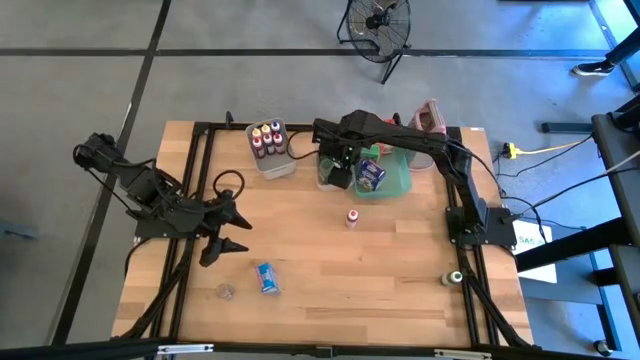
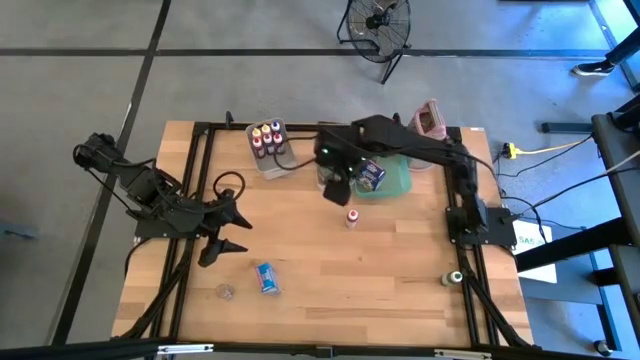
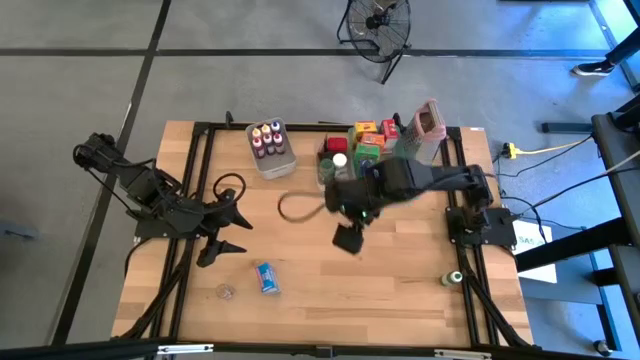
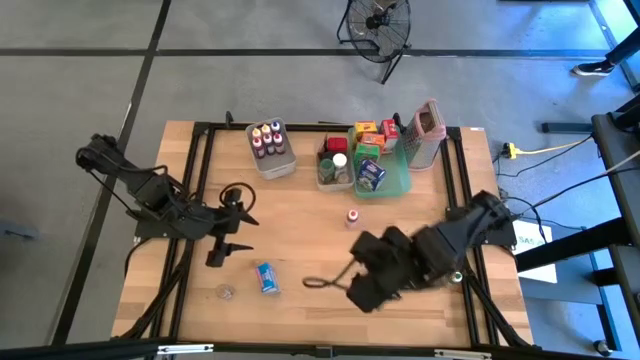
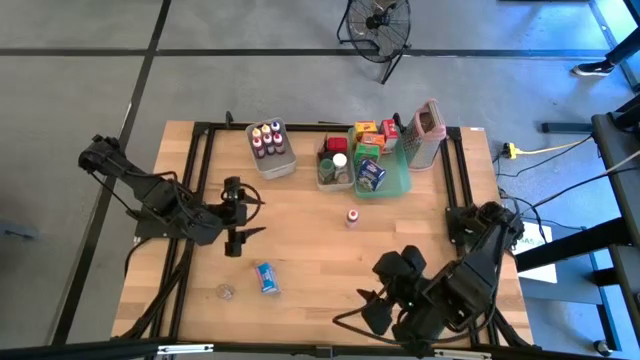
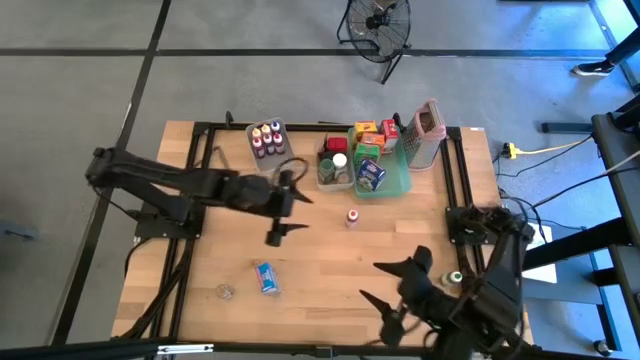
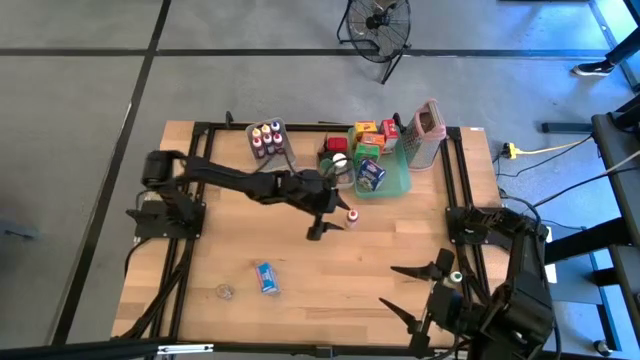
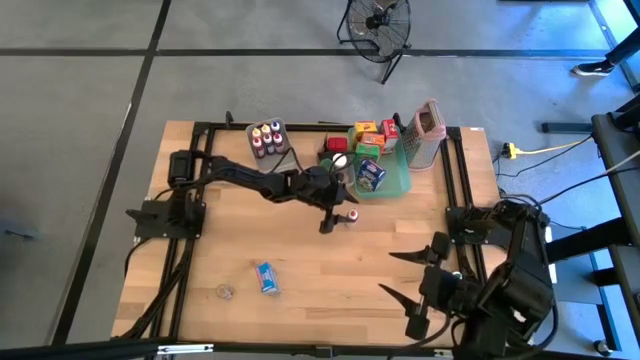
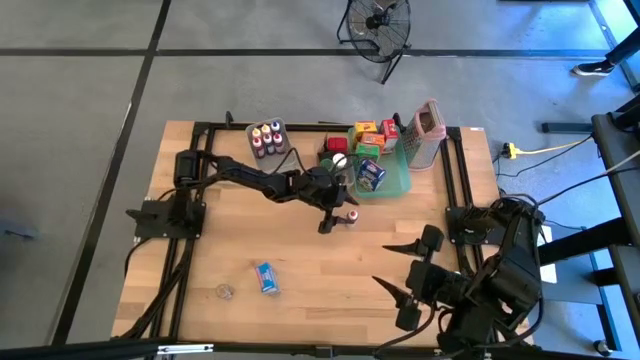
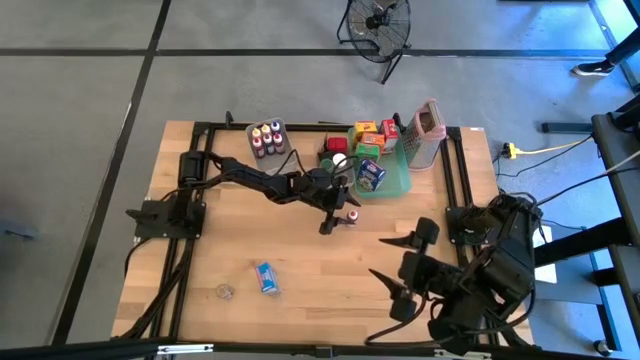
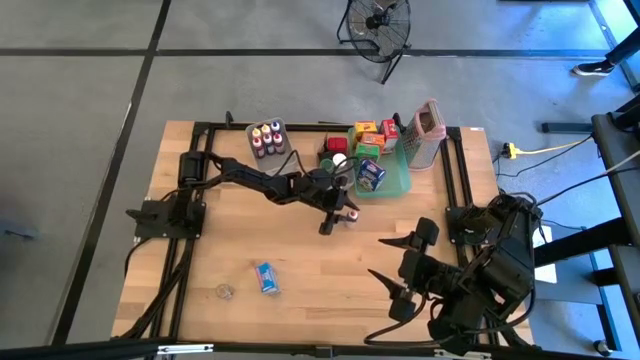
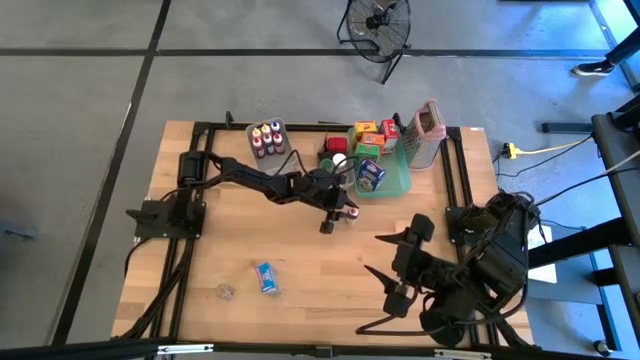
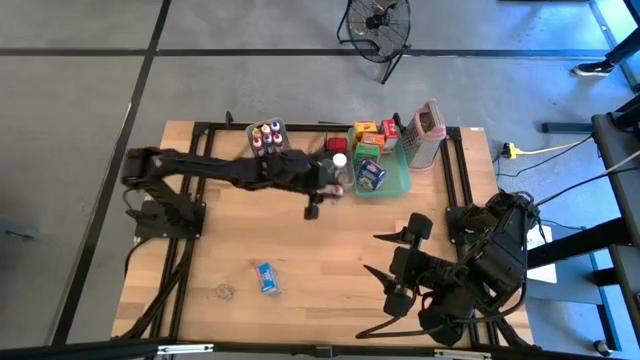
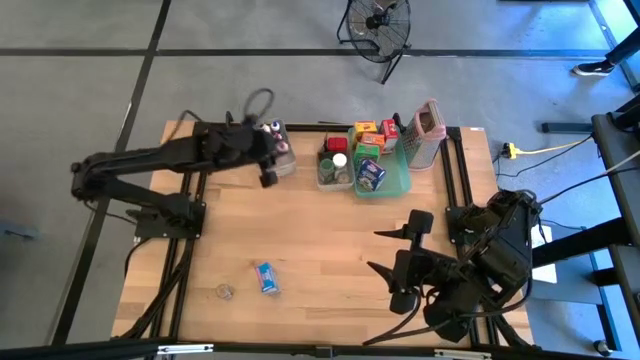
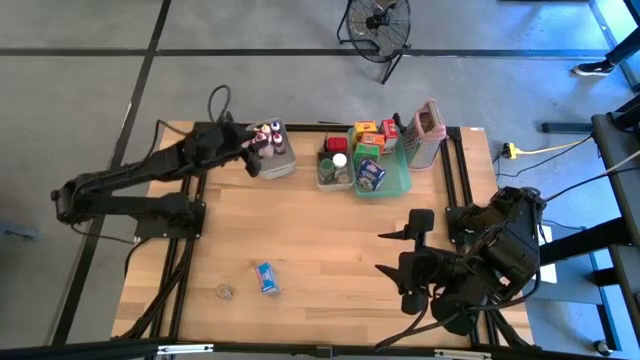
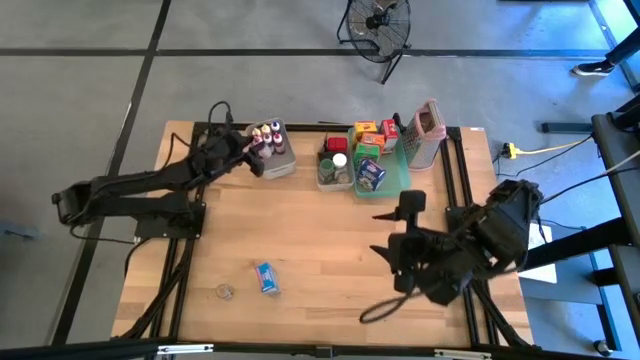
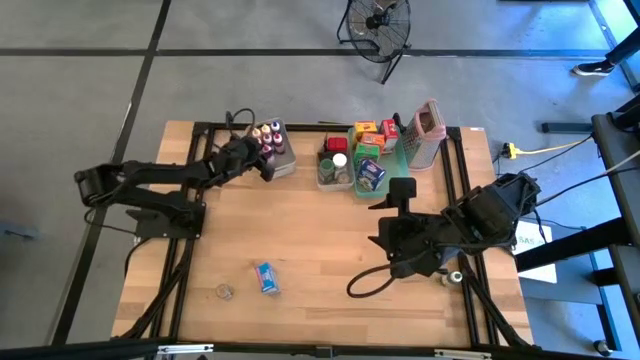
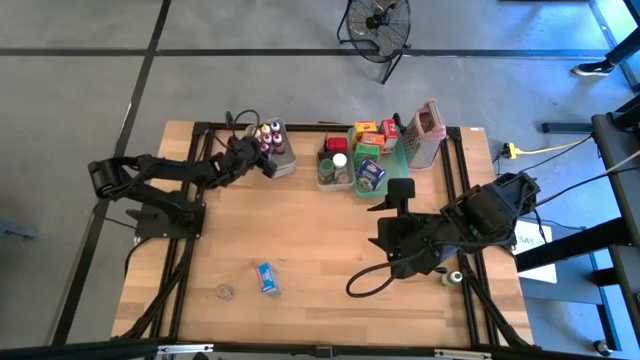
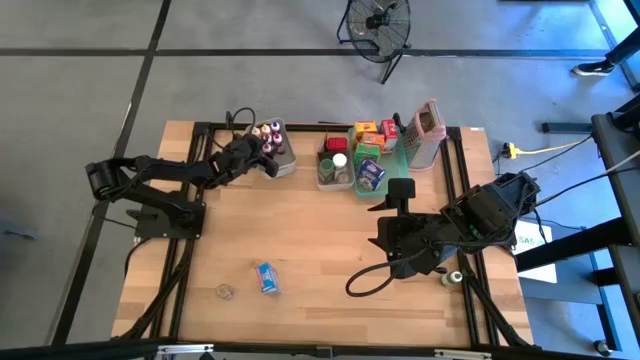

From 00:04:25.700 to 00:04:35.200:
Task: Pick & Place Kitchen Items
Put the pink food coloring bottle into the gray bin

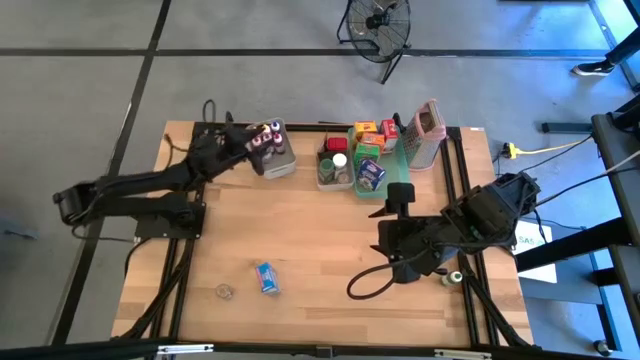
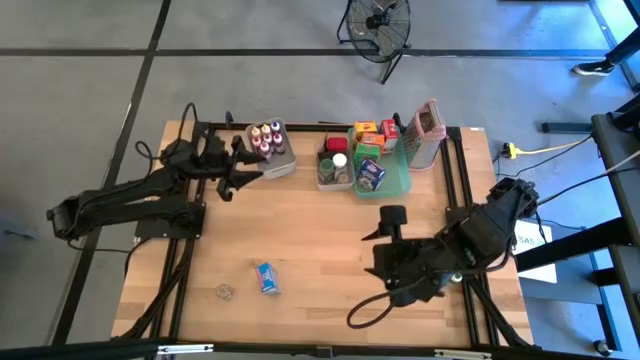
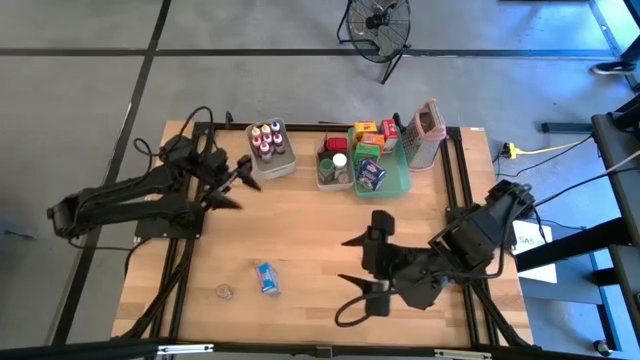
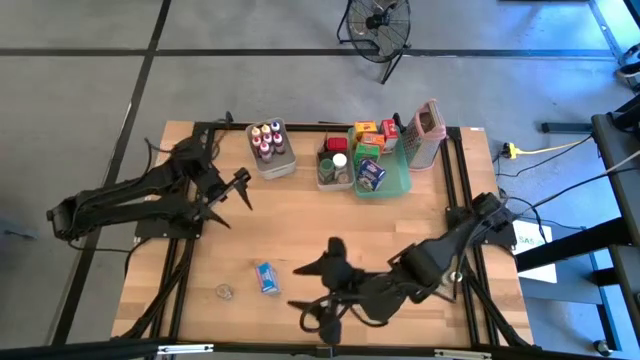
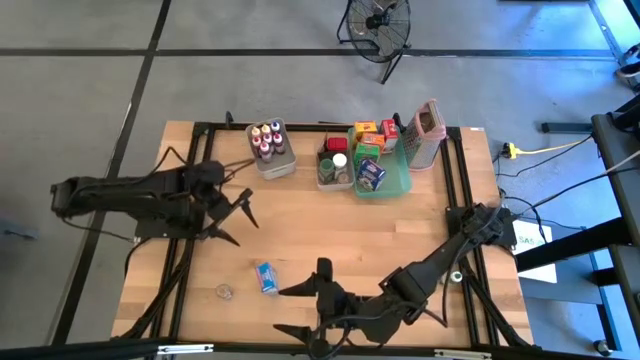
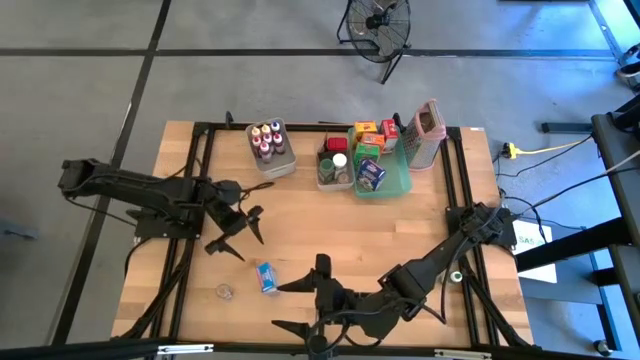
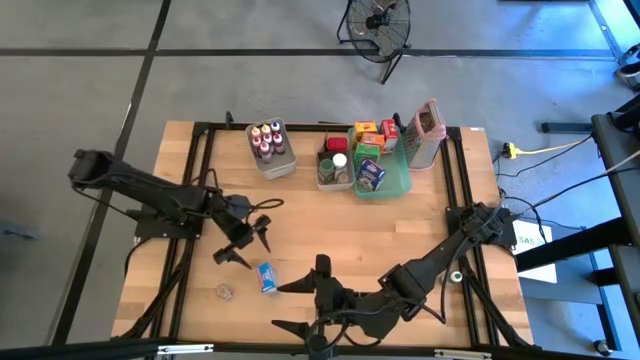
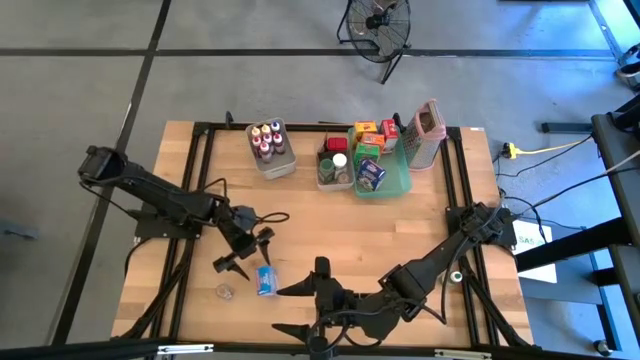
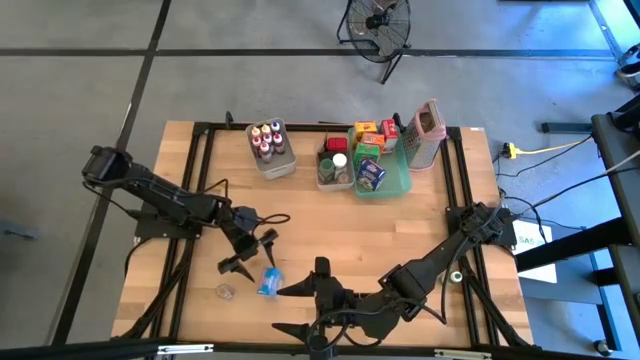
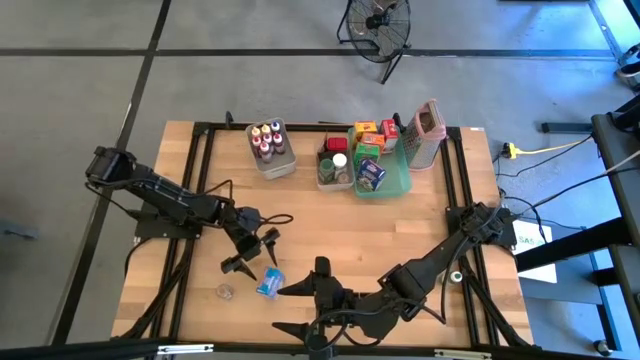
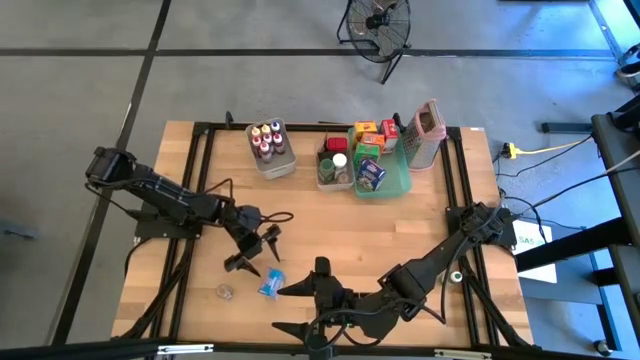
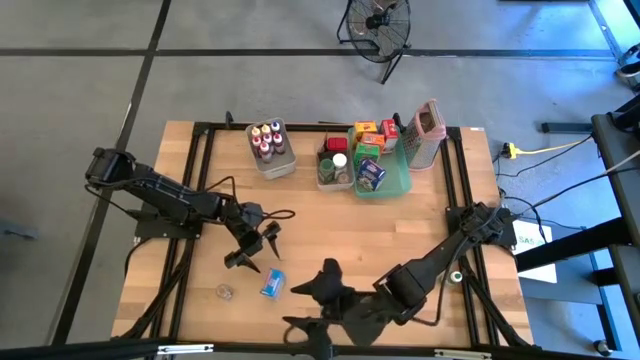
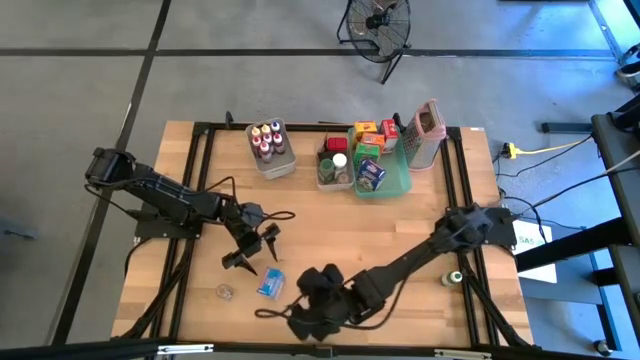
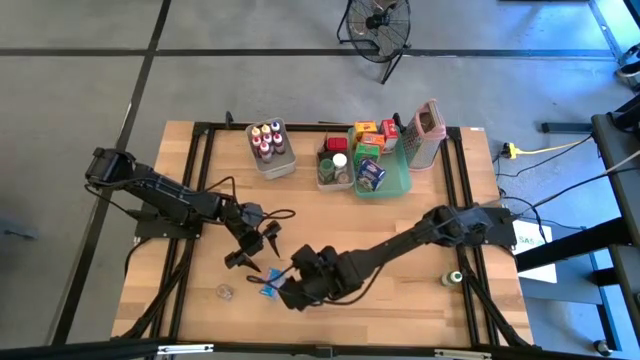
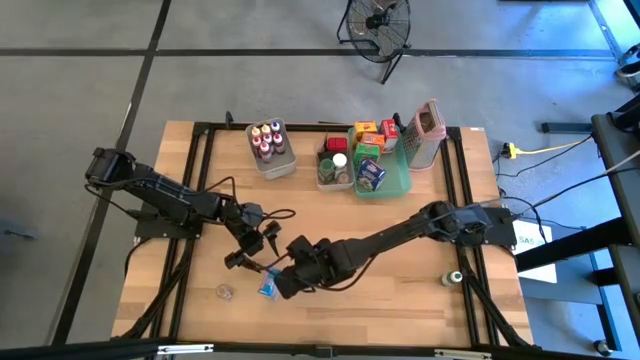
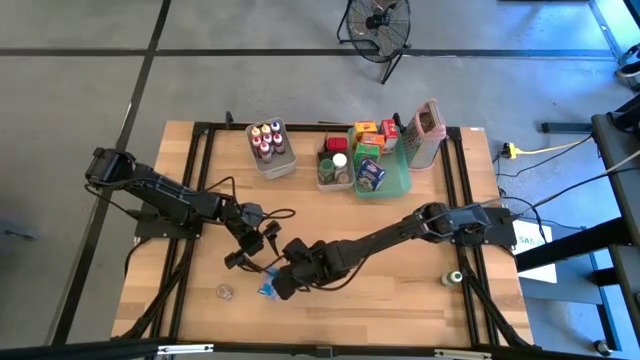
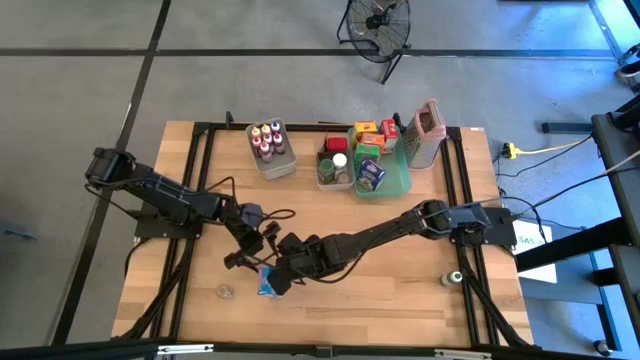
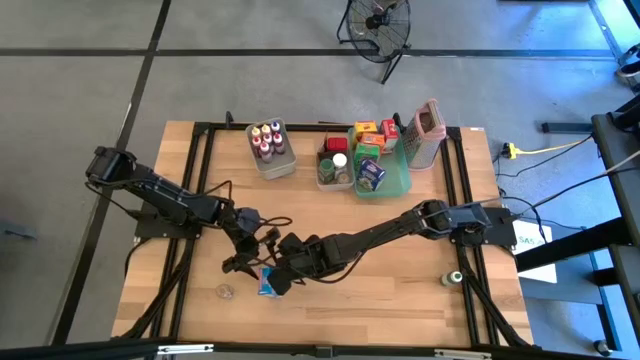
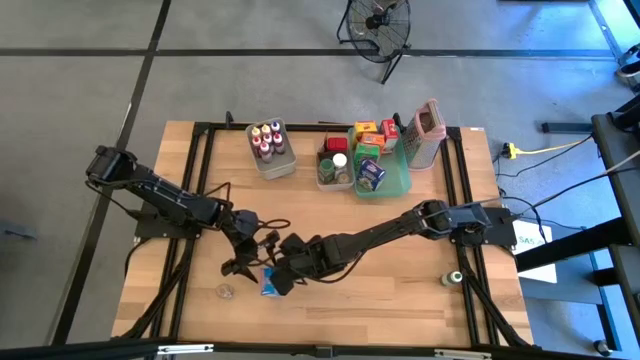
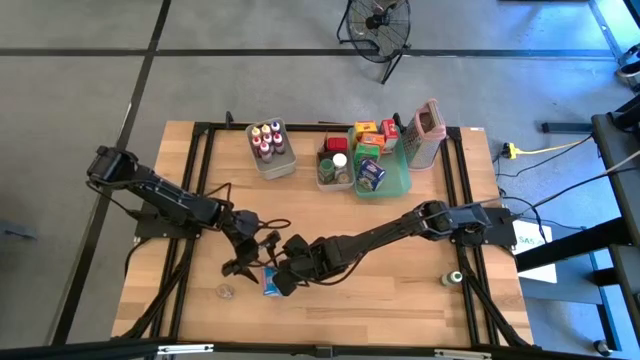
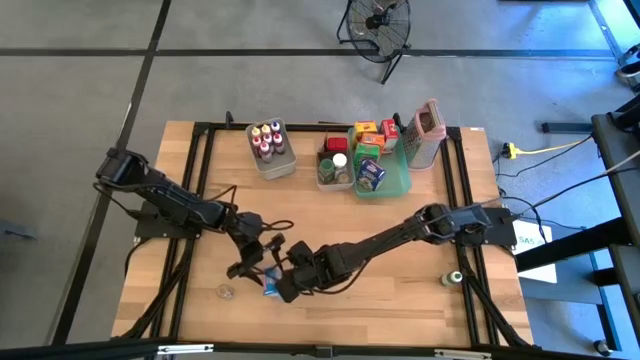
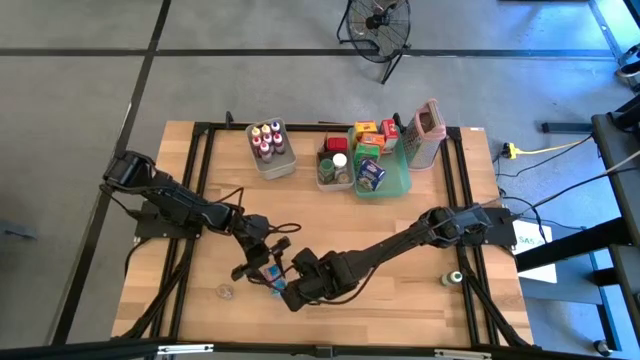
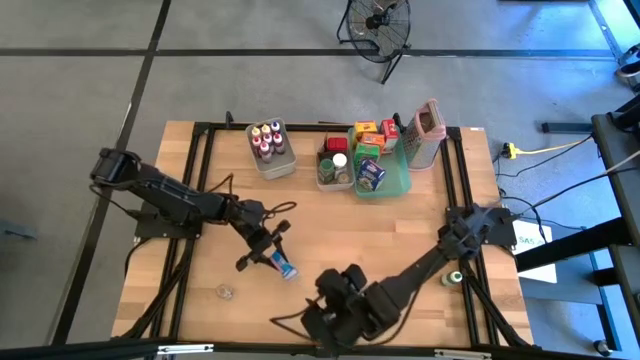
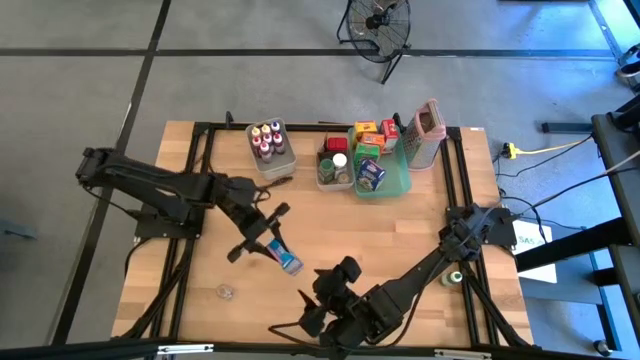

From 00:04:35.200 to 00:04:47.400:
Put the light blue cereal box into the green bin
